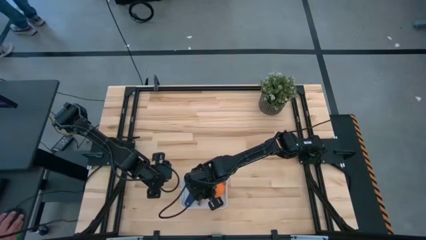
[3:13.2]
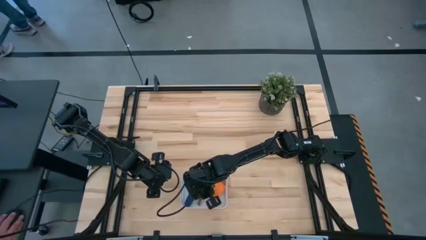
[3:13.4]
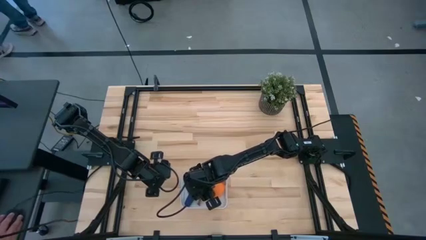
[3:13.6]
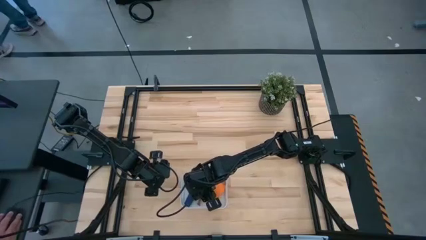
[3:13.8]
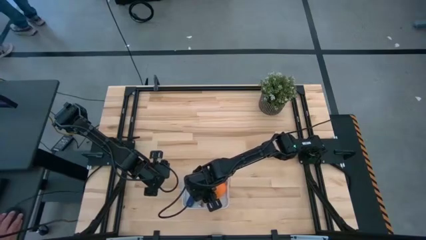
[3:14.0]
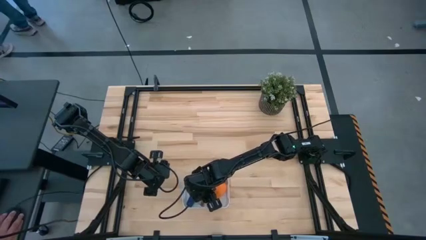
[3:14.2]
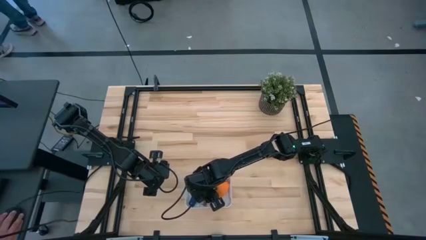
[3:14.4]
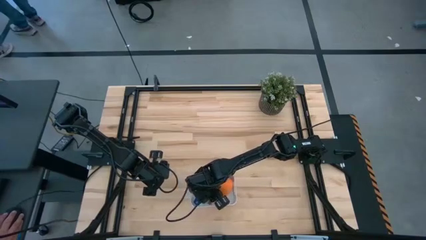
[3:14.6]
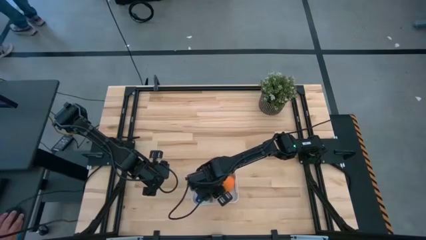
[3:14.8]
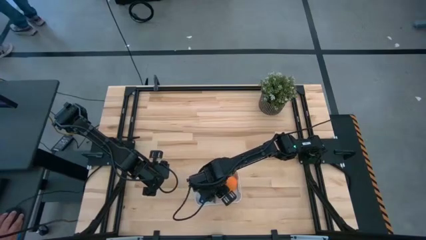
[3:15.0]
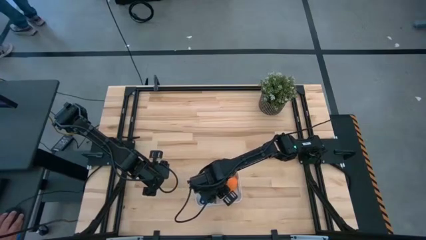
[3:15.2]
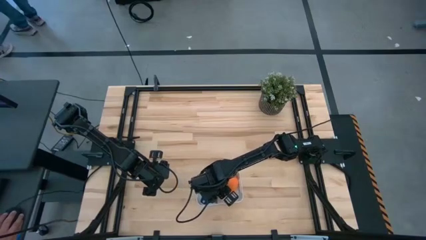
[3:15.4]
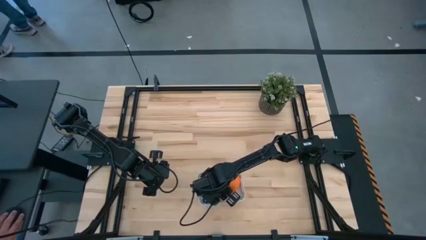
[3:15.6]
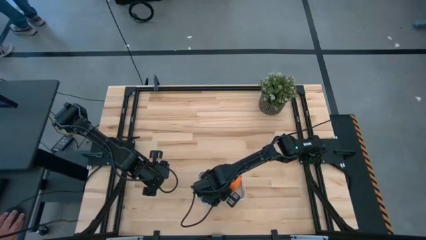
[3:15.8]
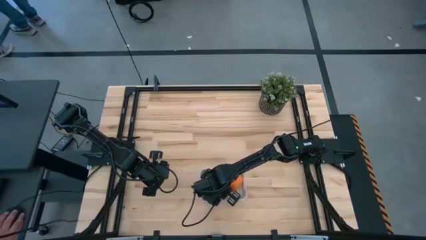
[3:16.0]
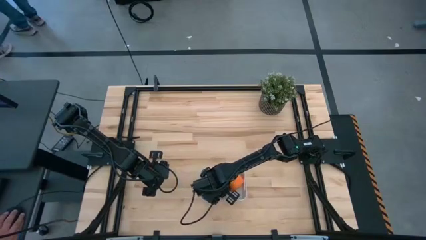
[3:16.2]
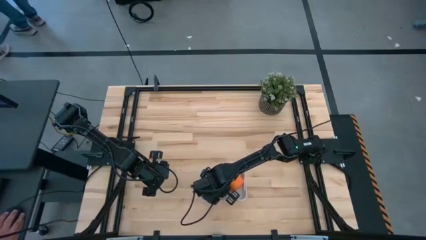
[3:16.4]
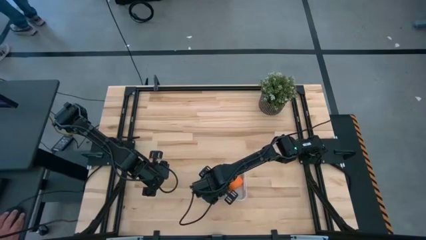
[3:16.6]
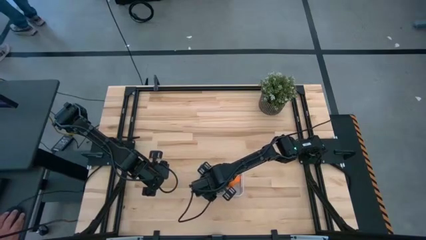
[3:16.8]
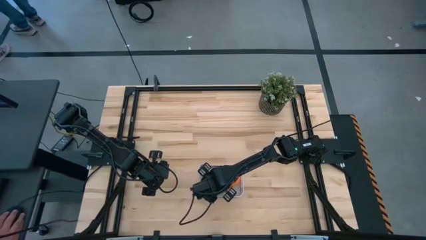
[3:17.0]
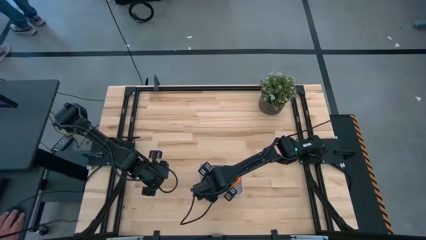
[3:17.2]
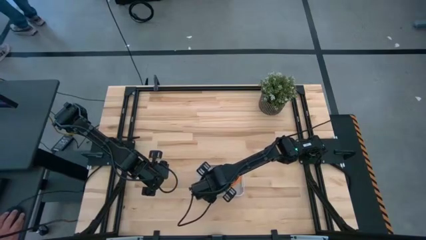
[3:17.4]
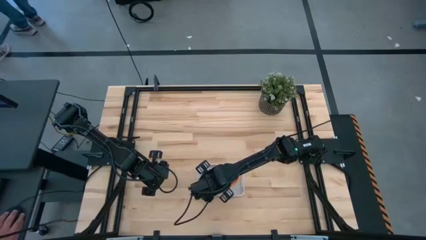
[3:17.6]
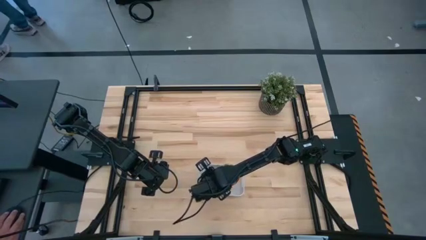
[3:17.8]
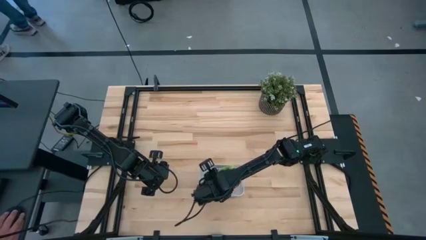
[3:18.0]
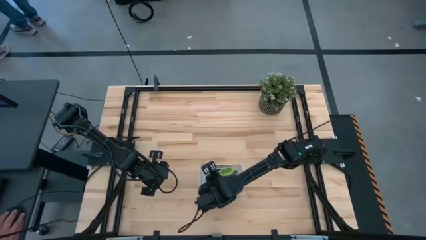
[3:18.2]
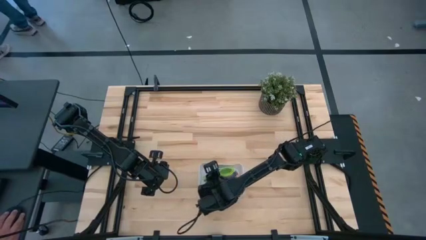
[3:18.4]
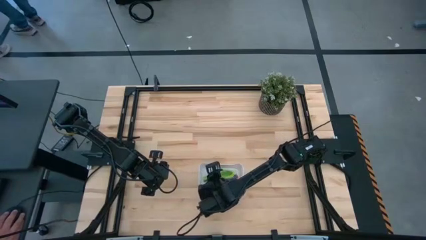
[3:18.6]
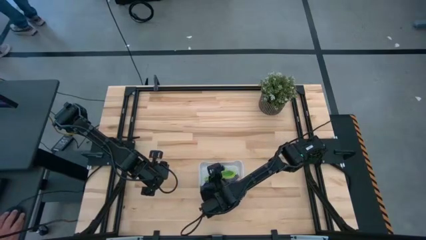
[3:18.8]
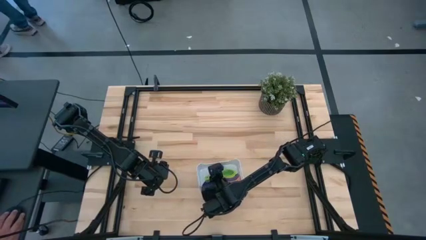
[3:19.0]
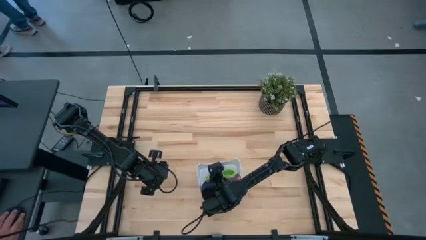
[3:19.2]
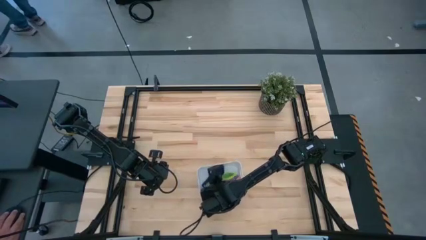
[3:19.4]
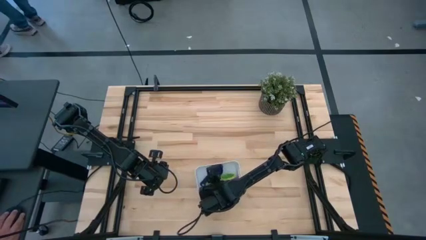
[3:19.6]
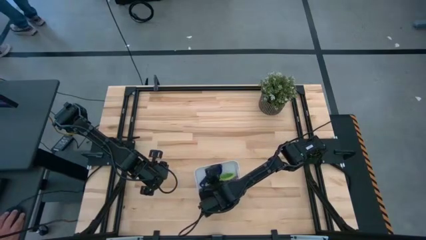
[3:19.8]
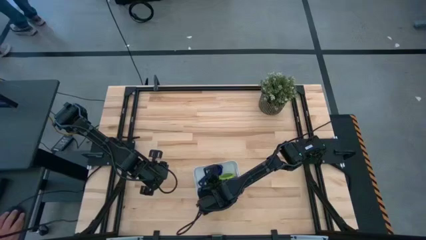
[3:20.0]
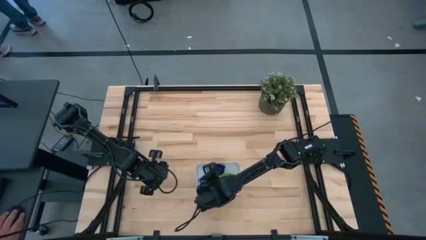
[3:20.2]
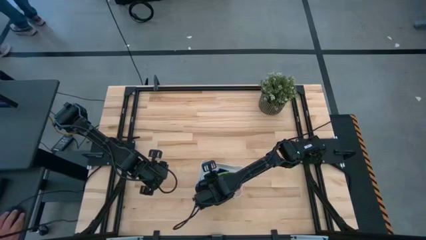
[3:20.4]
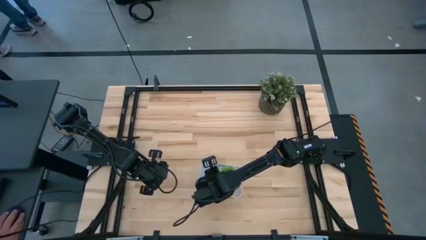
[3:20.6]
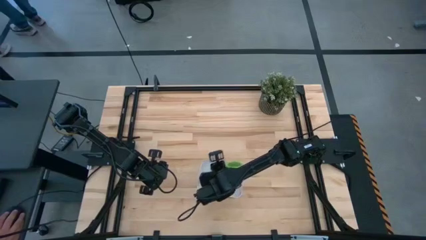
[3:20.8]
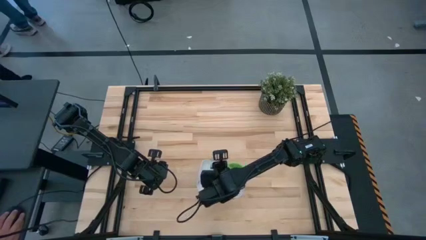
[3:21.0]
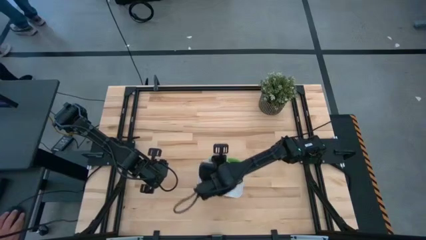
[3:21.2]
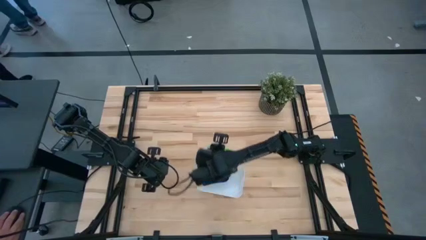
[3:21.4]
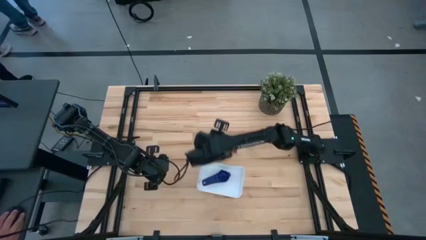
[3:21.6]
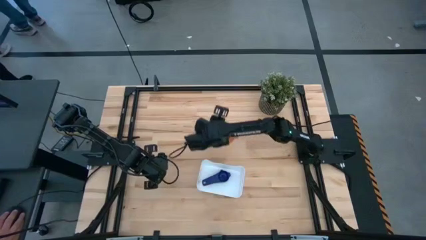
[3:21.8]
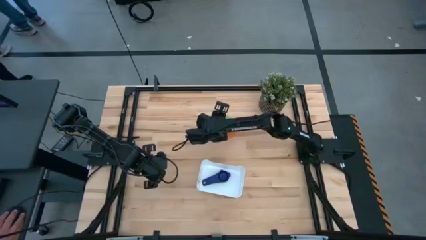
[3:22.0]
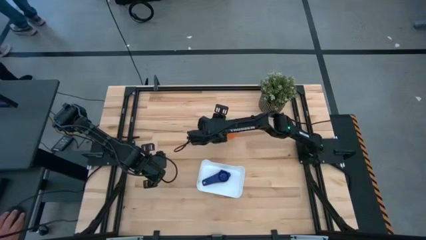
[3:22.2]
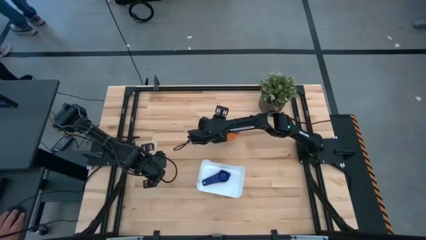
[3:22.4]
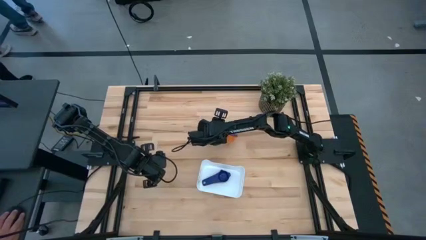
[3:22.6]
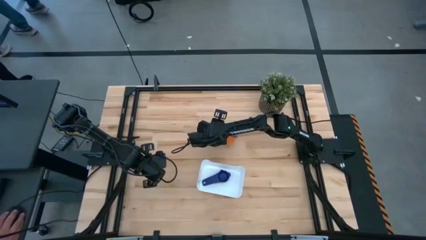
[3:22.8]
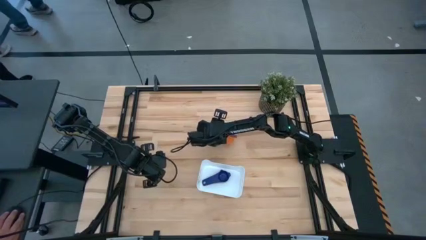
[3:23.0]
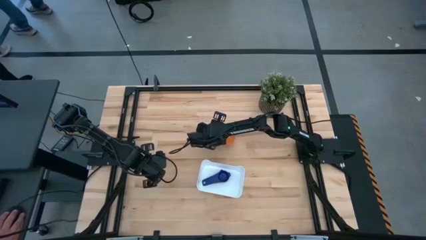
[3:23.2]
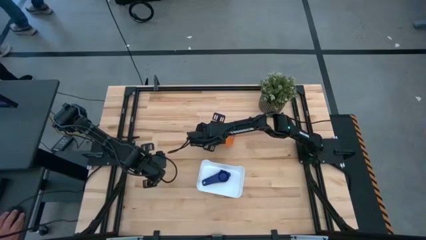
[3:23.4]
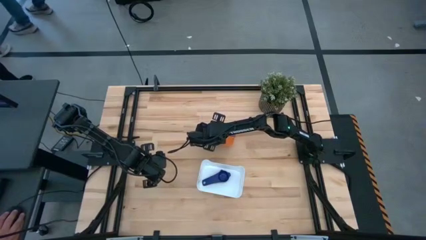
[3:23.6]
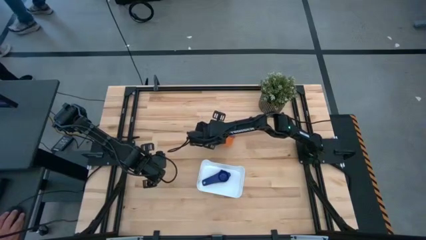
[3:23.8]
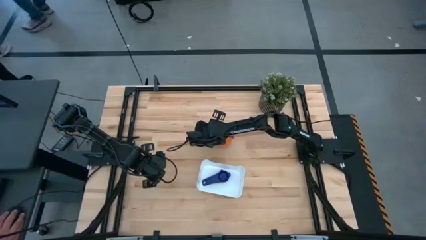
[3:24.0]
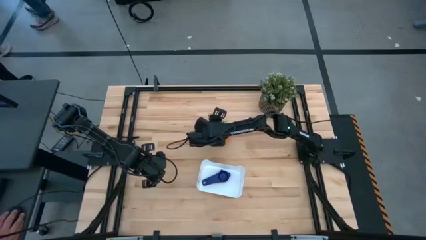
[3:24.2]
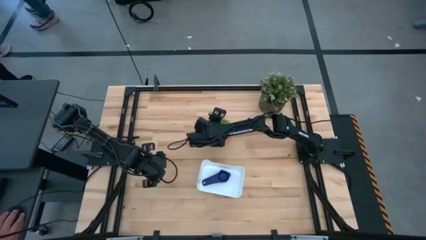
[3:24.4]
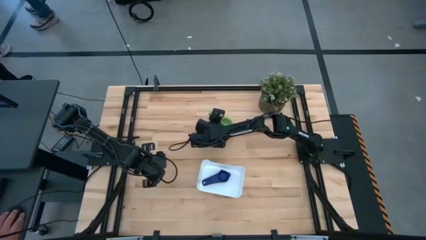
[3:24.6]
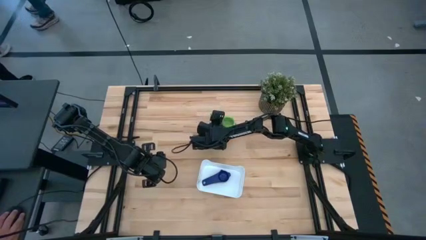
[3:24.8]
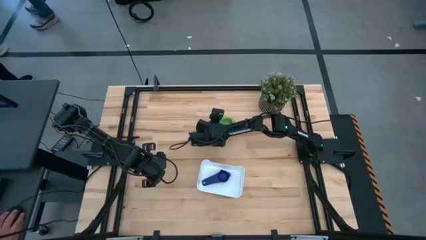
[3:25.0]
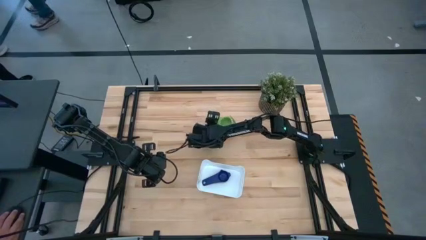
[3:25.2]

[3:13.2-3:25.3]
Task: Nest measuring cups in basket
Remove the nested measuring cups from the white bin

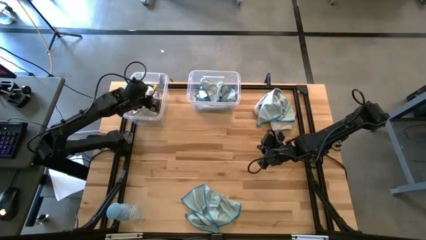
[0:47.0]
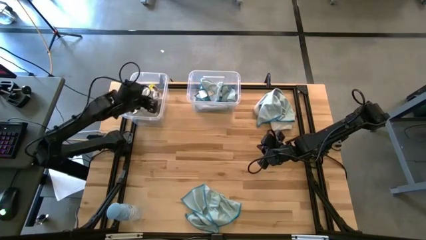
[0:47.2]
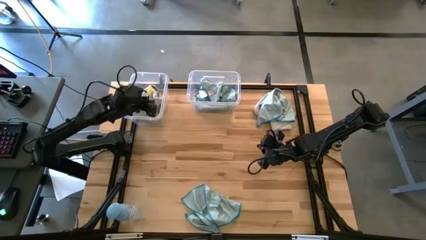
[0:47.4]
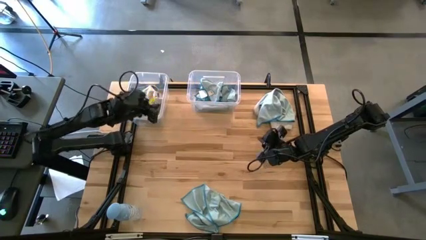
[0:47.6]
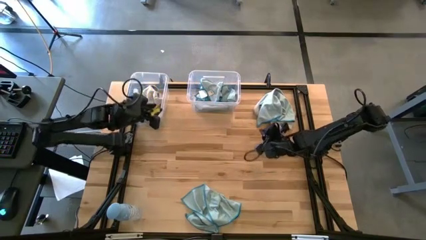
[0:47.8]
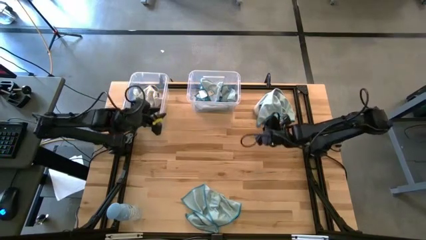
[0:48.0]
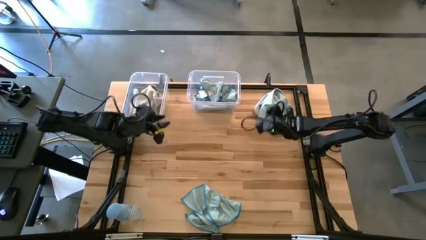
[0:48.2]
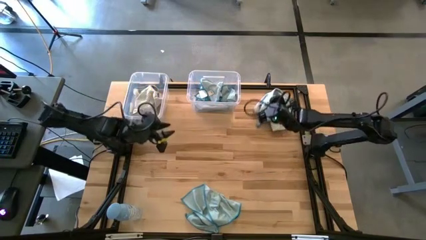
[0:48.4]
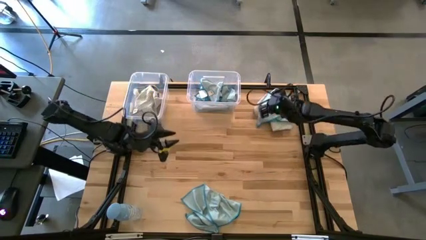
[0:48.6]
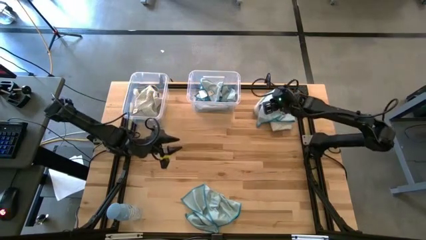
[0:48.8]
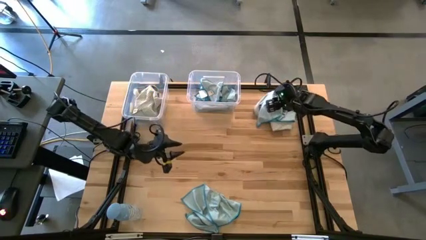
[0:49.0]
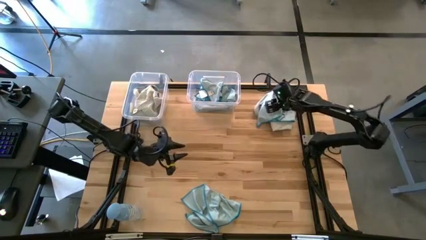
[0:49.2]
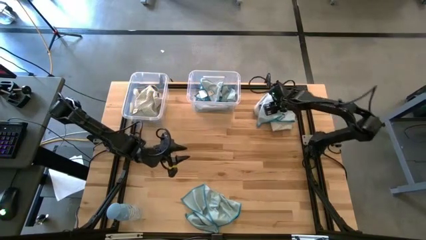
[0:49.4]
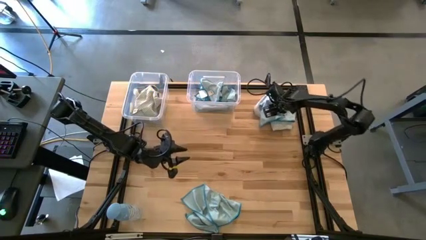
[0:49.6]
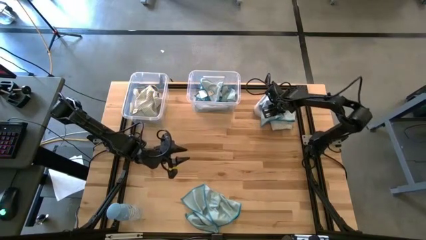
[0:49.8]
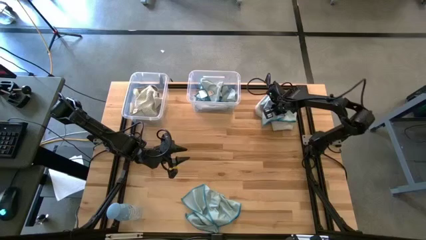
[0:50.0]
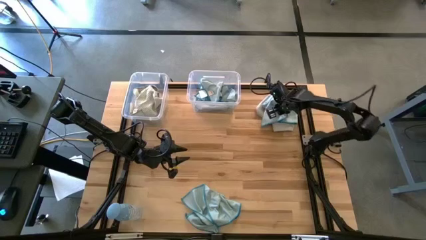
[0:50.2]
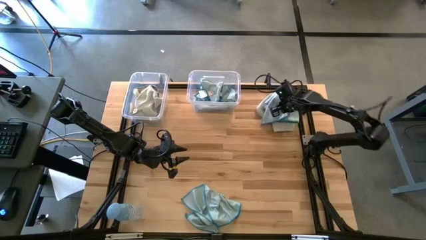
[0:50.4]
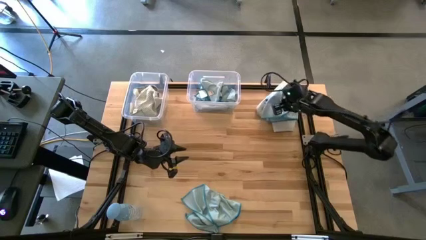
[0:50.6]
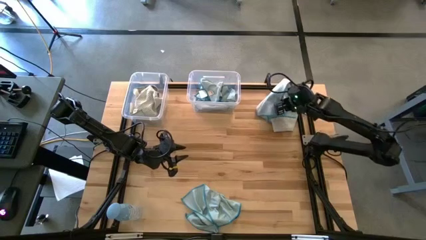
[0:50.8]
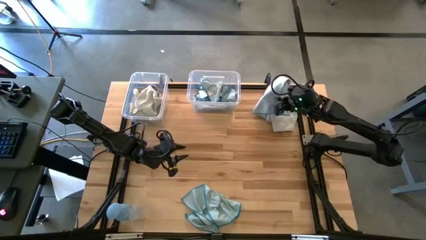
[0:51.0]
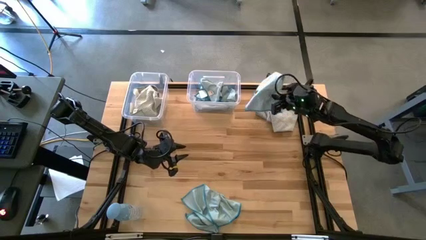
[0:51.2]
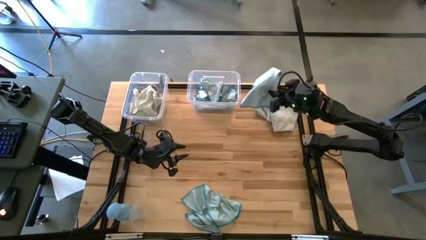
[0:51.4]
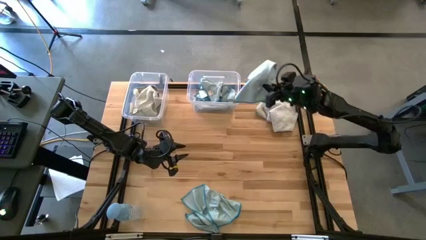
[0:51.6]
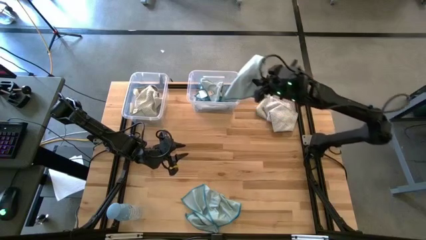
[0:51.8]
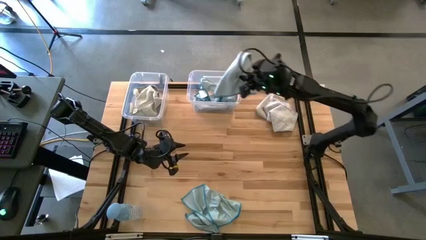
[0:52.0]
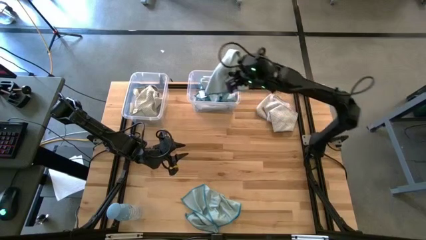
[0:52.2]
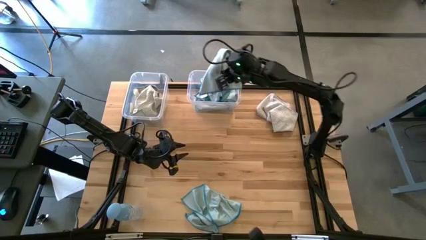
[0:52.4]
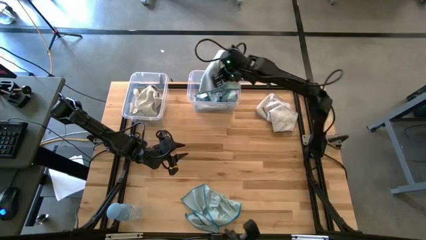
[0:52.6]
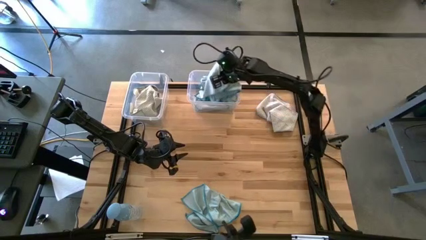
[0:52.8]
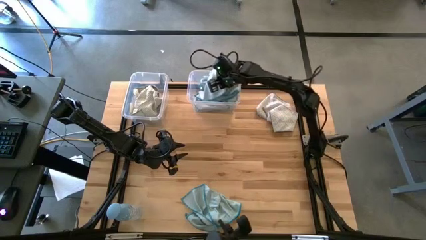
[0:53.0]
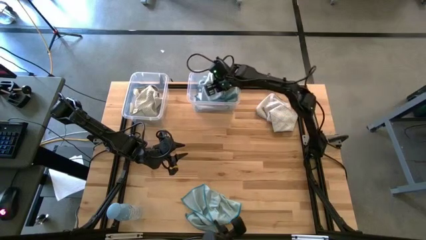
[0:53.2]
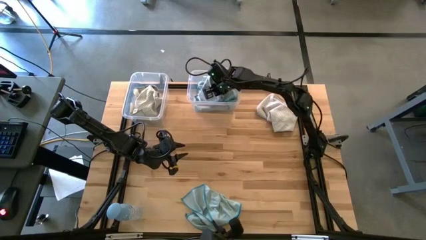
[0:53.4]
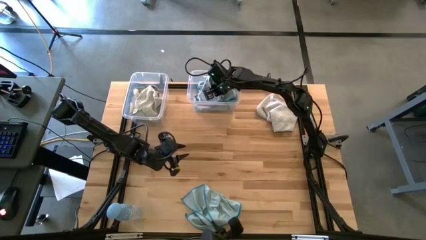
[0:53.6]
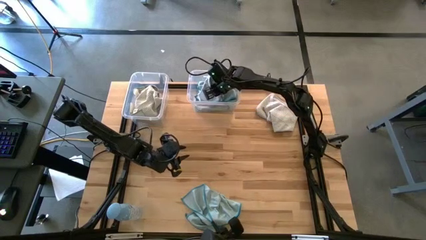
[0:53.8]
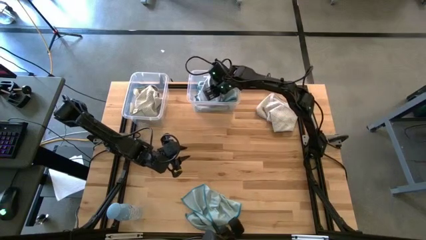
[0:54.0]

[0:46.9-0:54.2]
Task: Sort microfiber towel by color & place in baskets
Put the top blue microfiber cloth into the right transparent bin
